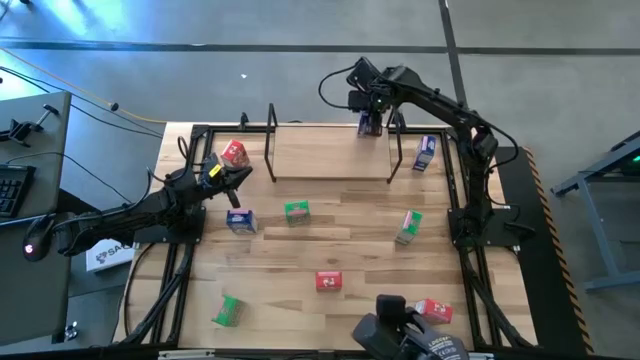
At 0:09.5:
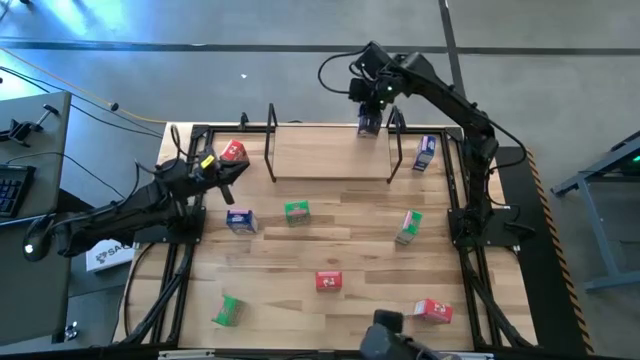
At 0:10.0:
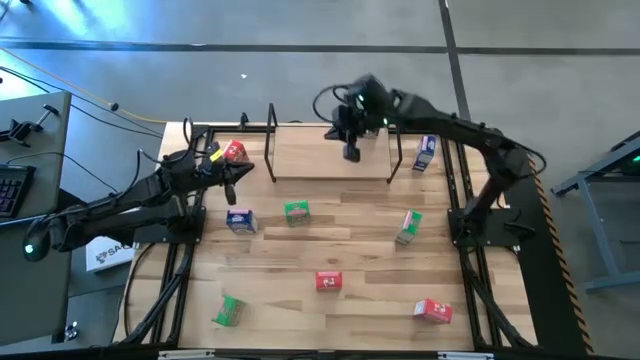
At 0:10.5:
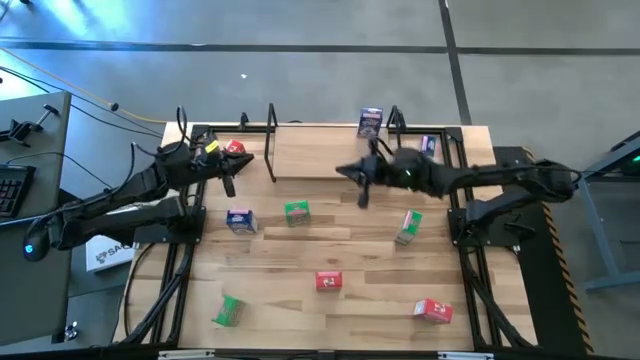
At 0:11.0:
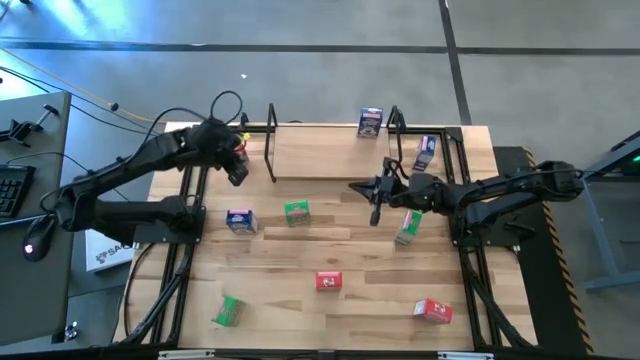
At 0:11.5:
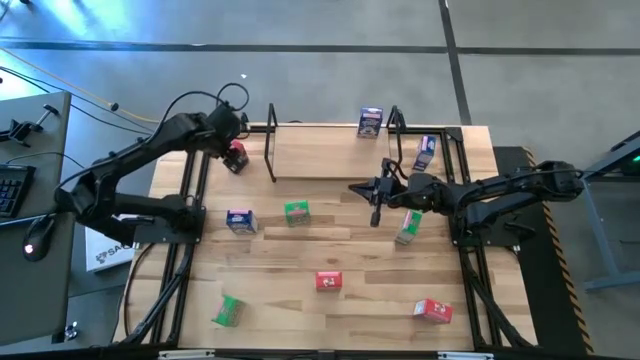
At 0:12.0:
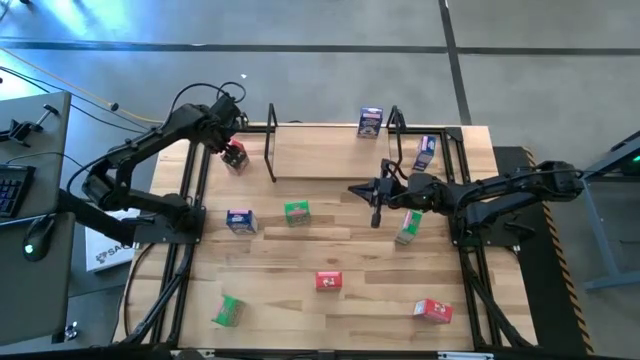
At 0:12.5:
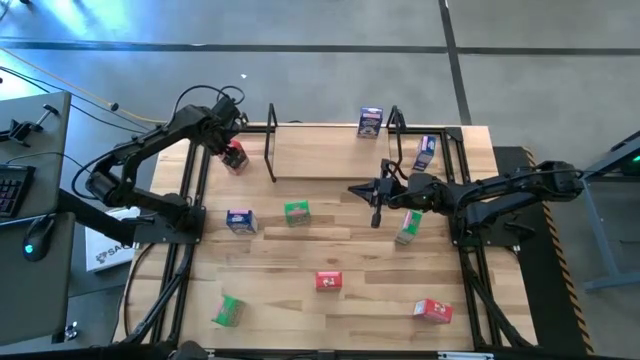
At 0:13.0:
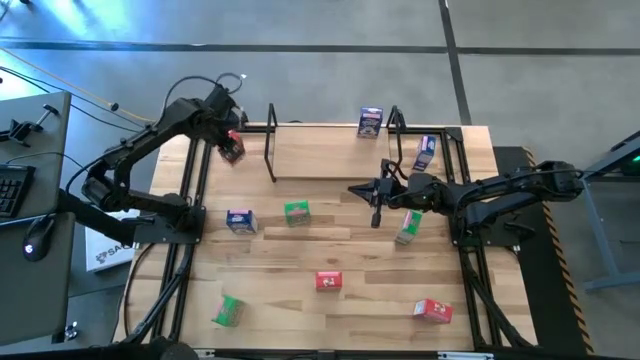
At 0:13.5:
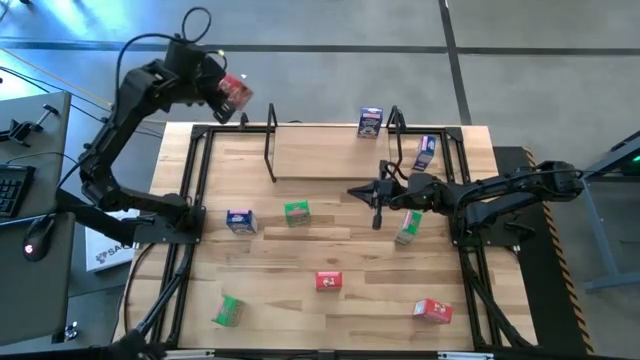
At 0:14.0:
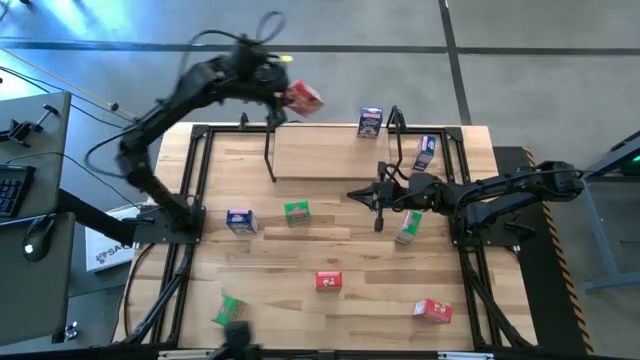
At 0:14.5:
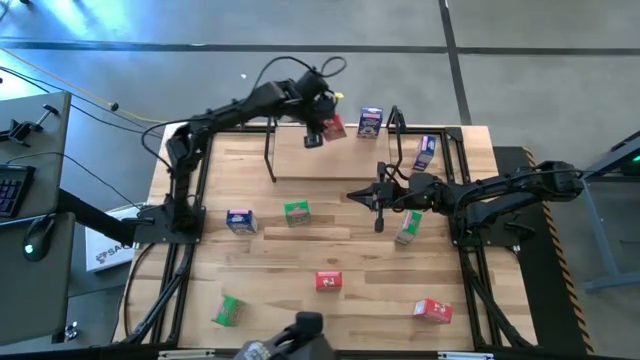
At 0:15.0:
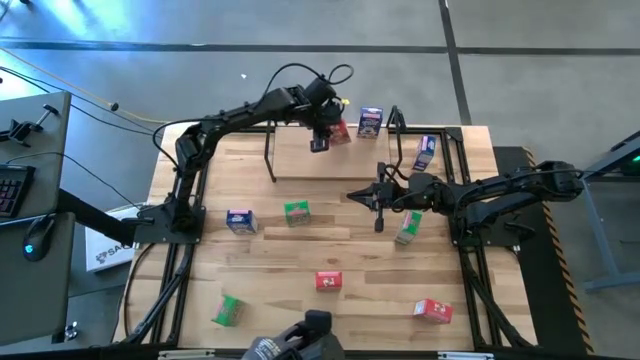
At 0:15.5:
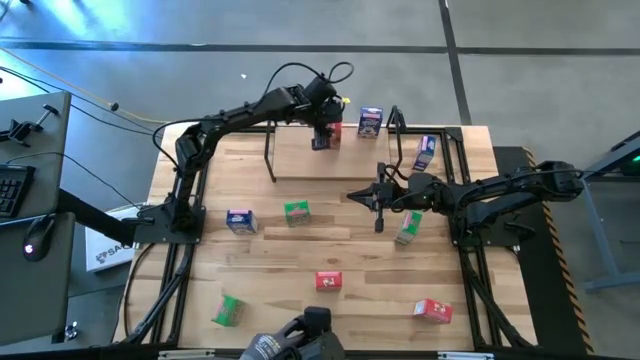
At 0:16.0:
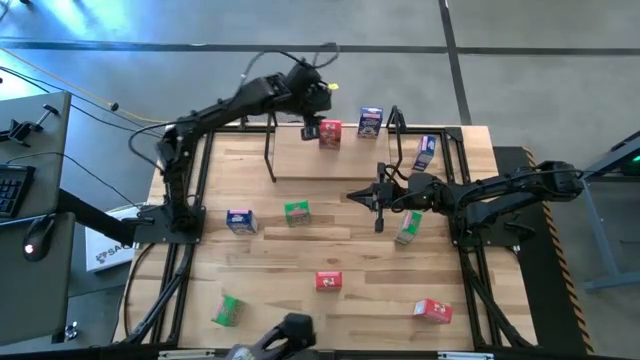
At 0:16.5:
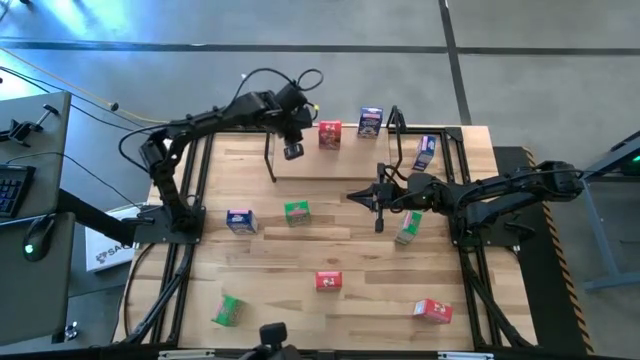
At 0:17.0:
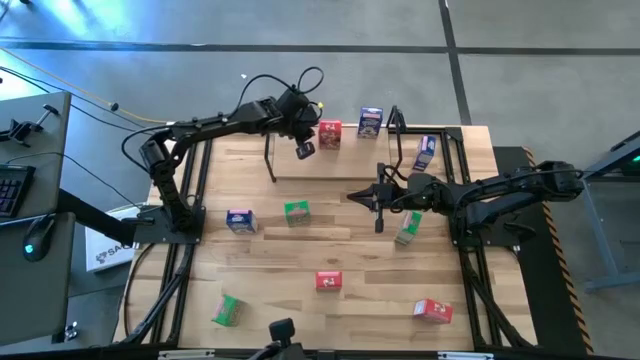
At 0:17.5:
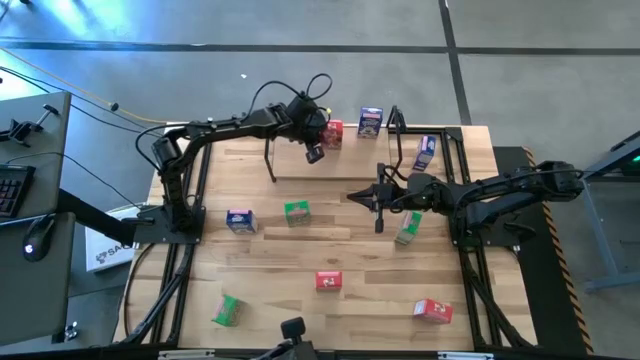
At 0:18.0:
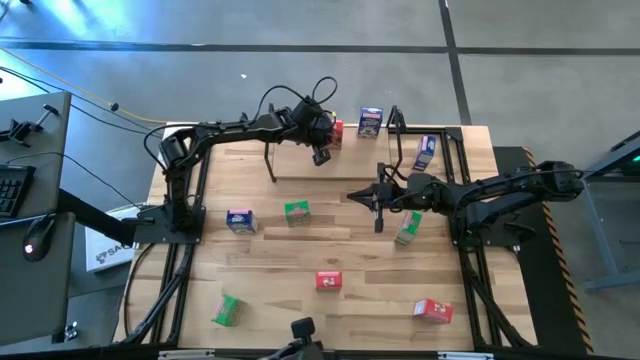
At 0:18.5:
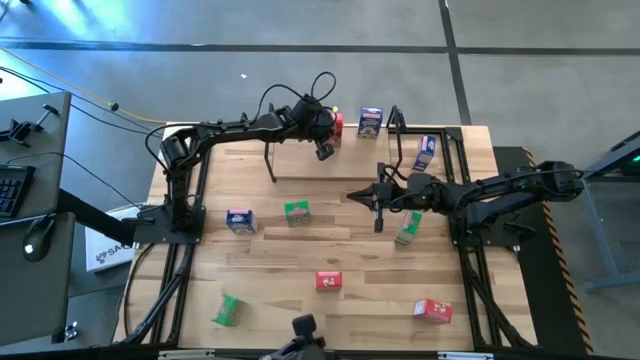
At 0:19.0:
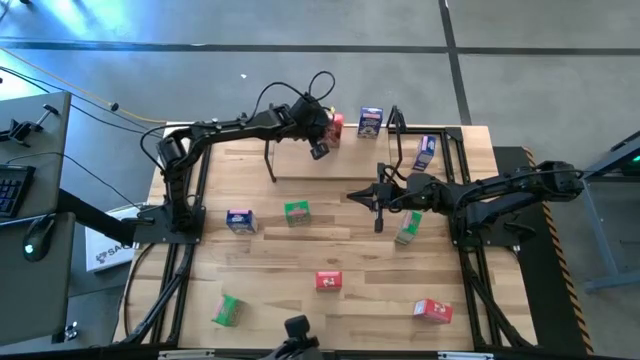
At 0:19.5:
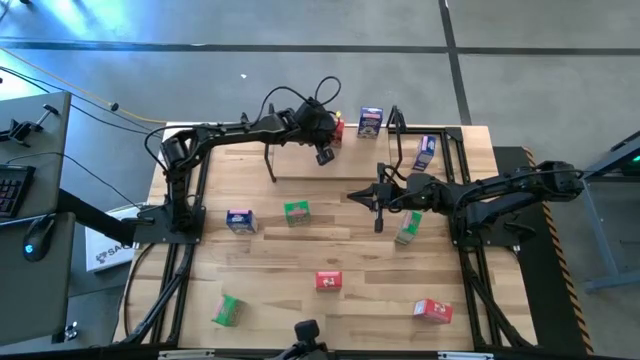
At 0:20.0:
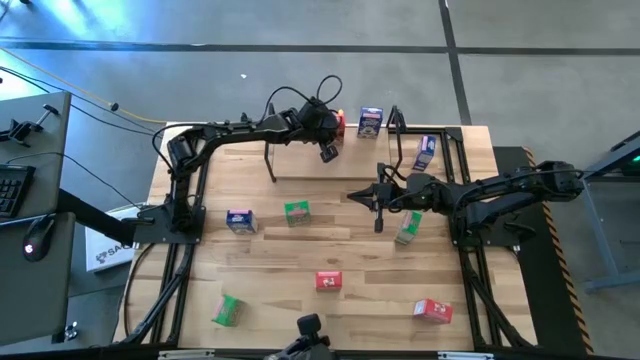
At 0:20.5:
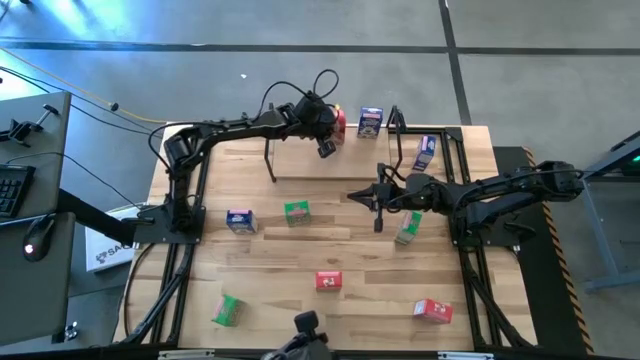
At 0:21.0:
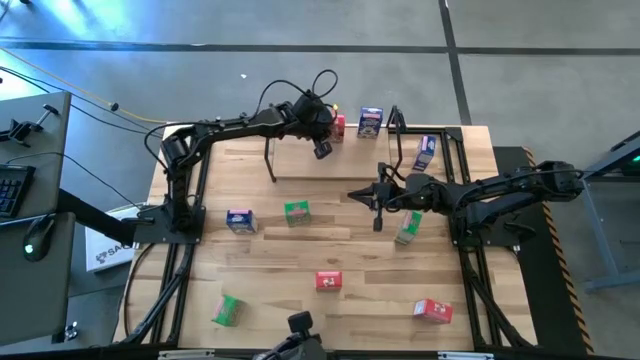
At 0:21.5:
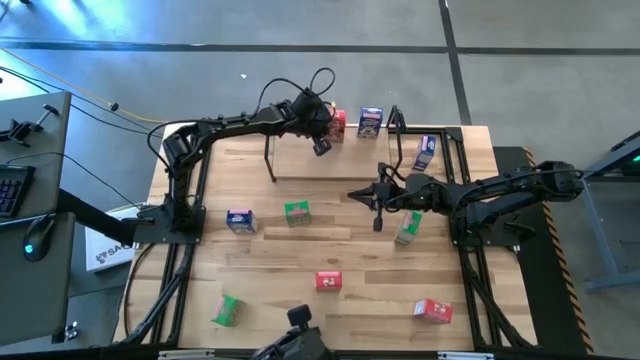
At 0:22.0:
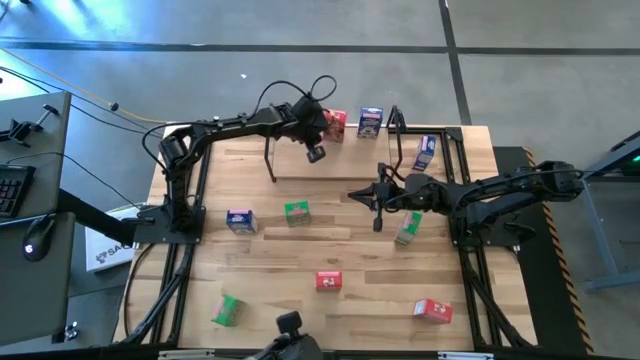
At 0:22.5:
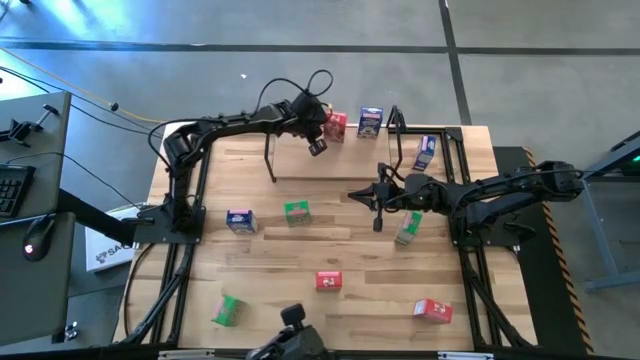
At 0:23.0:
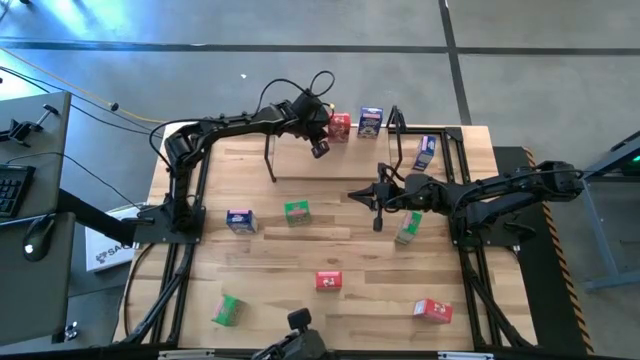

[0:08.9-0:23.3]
Task: Stack cereal on shelf
Put the top red cereal box on the shelf

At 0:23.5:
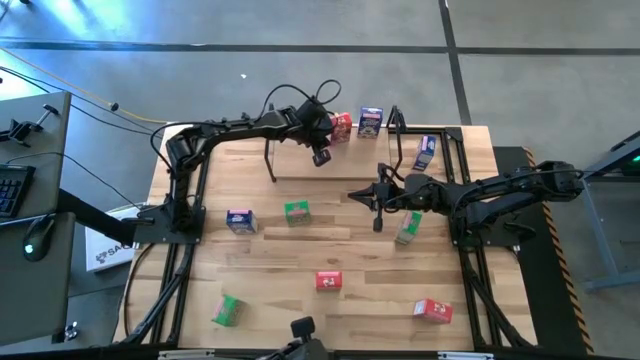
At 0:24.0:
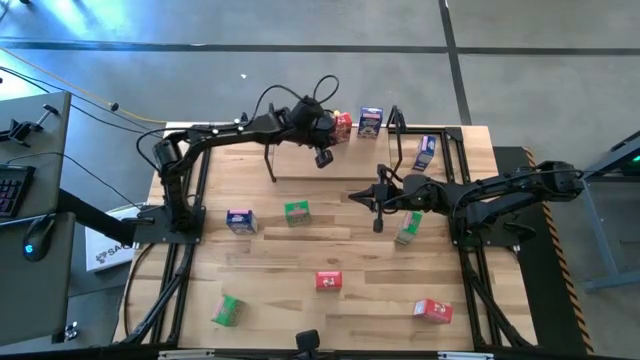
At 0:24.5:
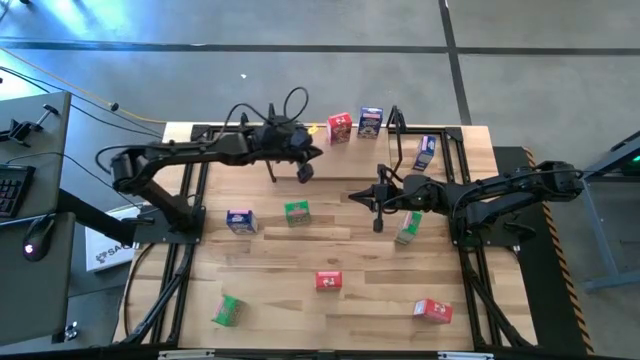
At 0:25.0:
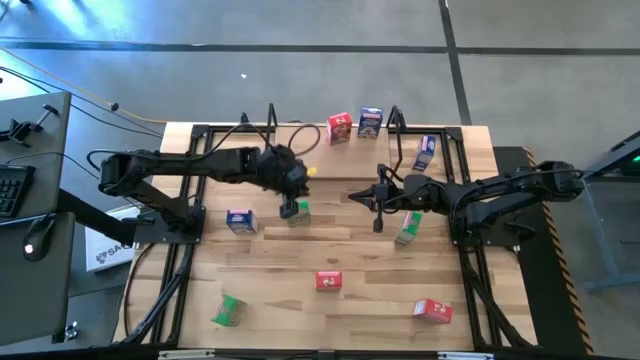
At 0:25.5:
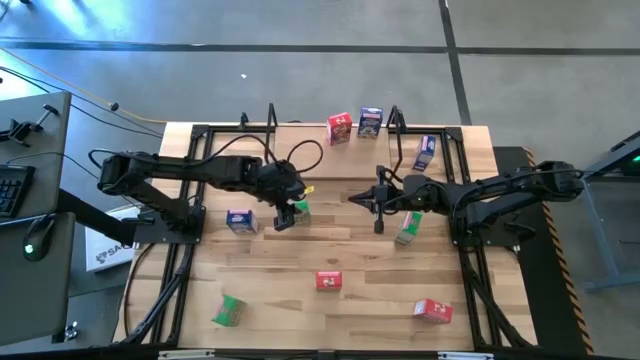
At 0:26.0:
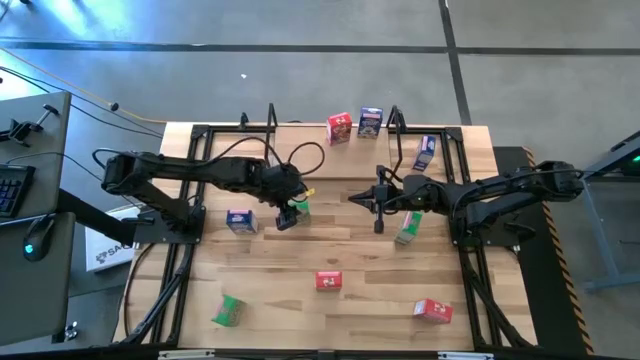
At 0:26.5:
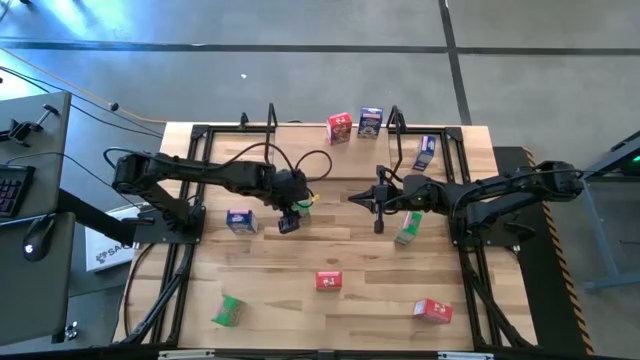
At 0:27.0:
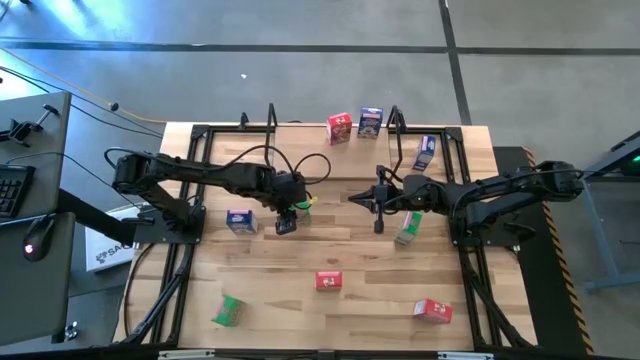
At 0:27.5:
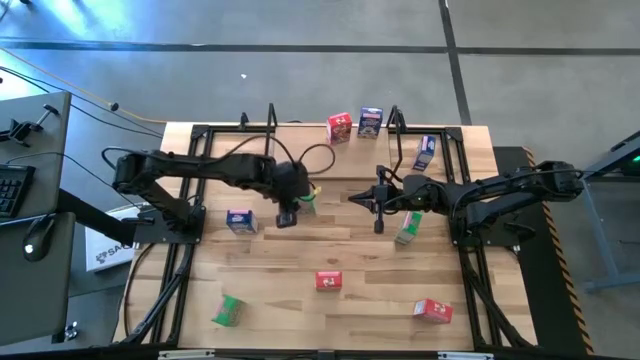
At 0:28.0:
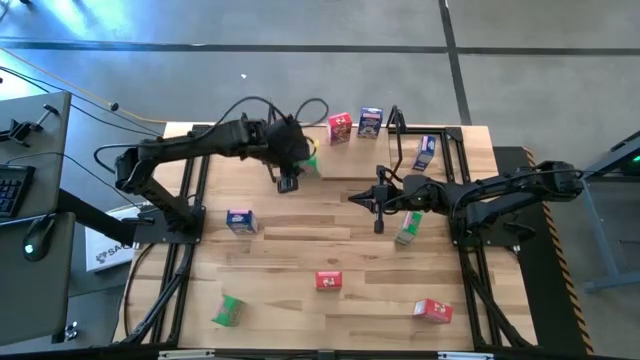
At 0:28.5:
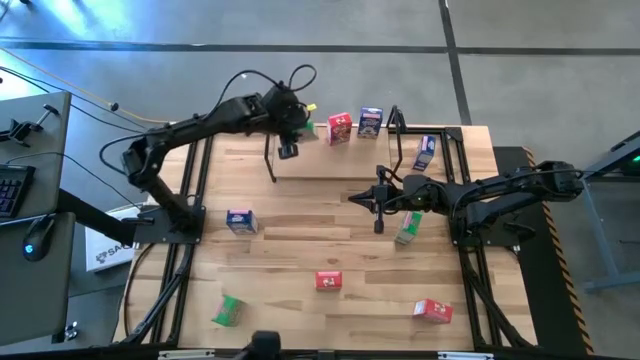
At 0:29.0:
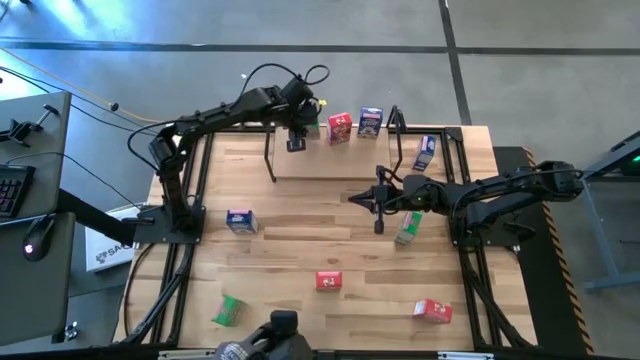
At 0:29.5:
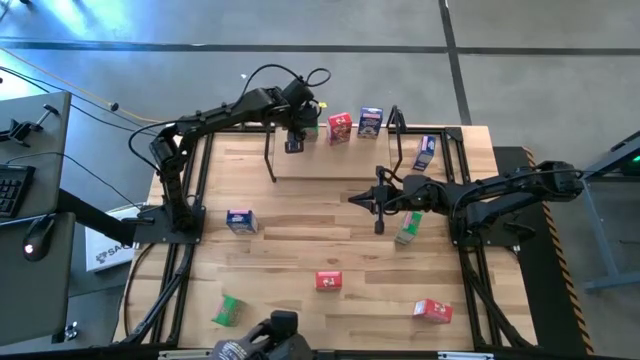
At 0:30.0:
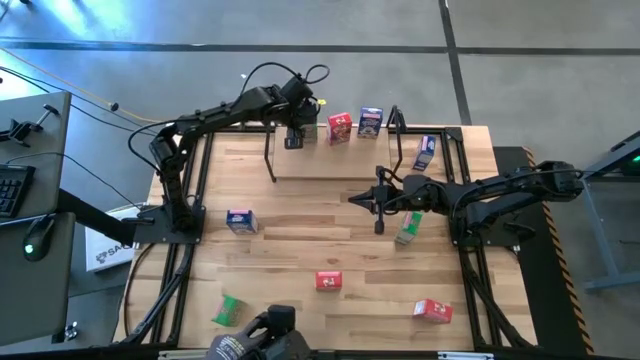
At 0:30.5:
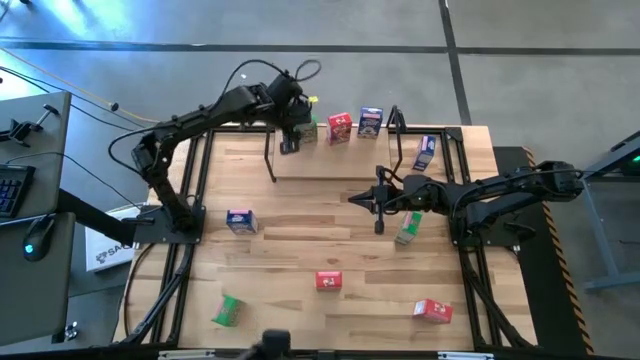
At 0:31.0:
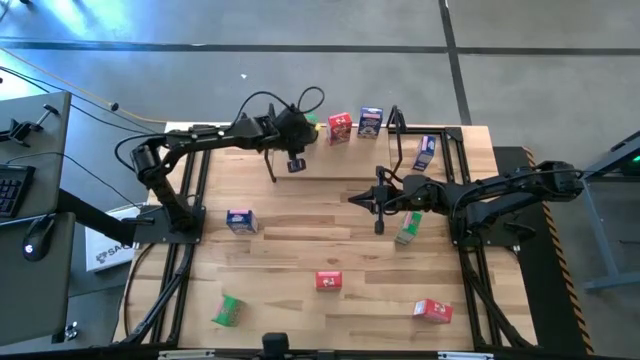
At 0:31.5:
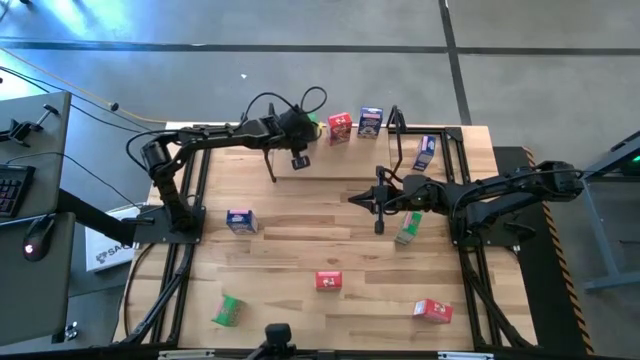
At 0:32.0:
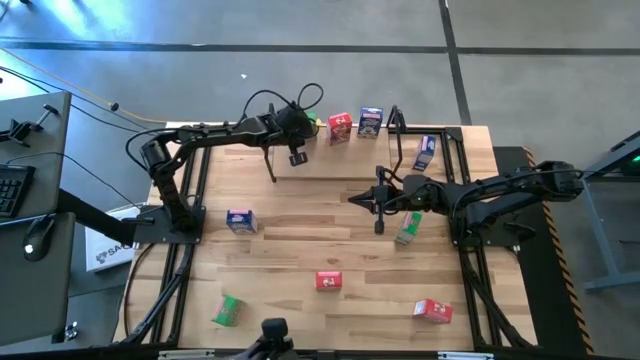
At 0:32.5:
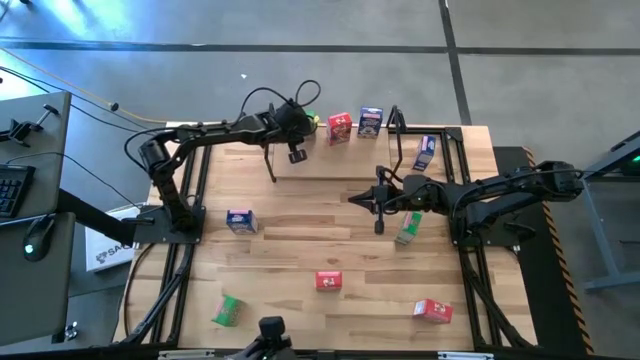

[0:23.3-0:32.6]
Put the top left green cereal box on the shelf
